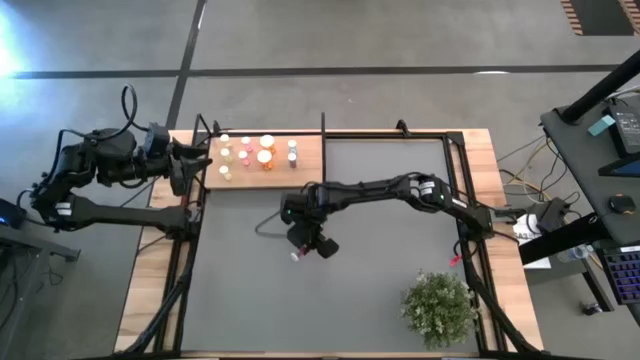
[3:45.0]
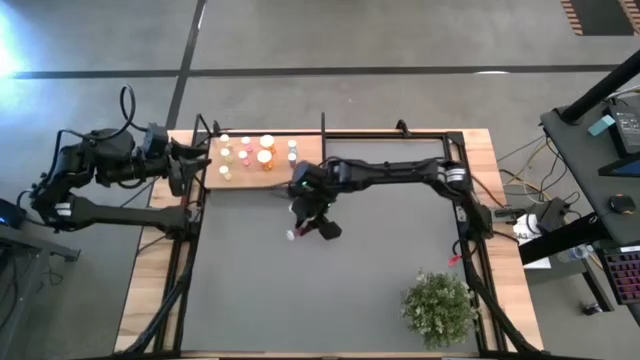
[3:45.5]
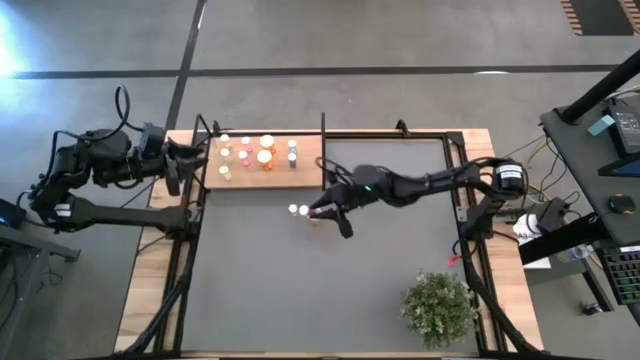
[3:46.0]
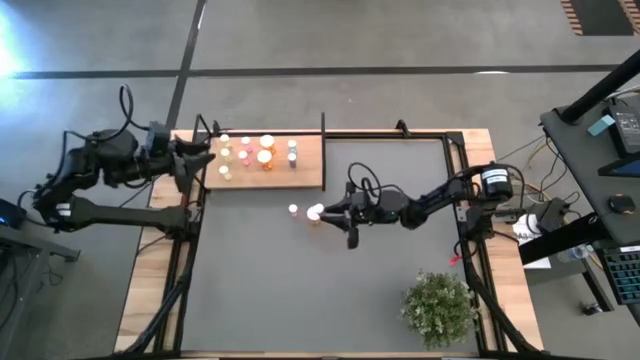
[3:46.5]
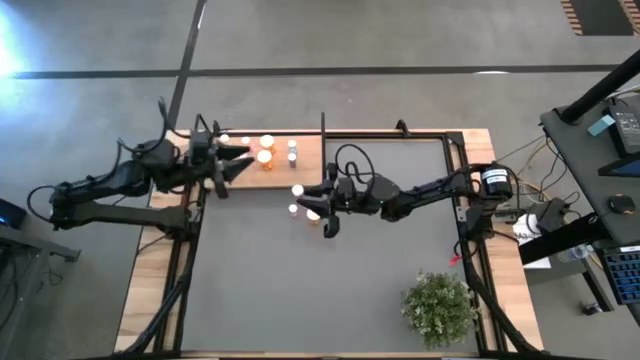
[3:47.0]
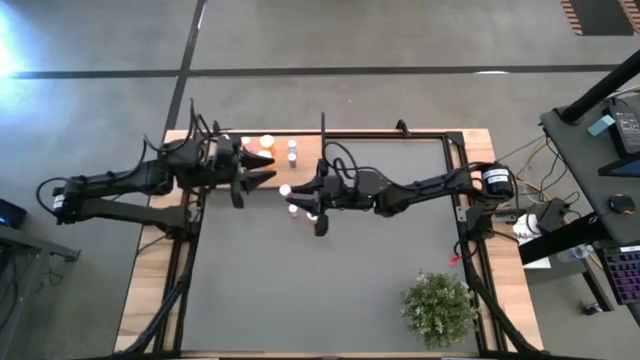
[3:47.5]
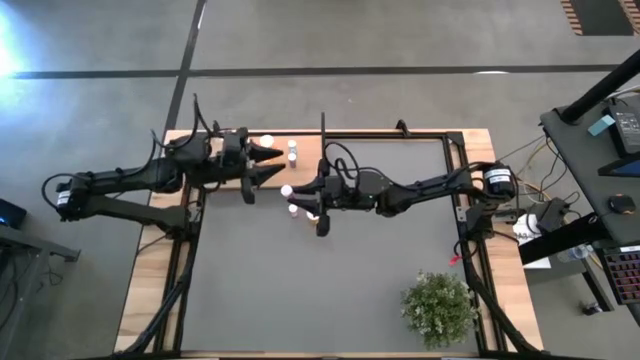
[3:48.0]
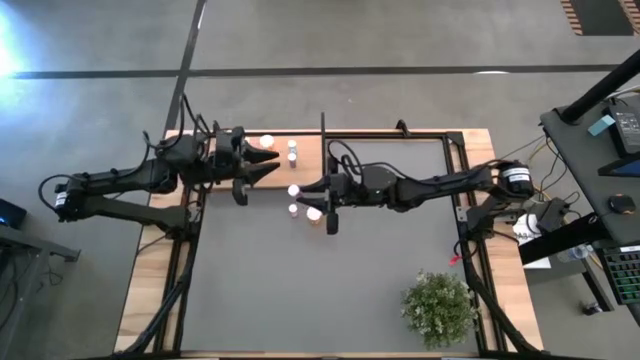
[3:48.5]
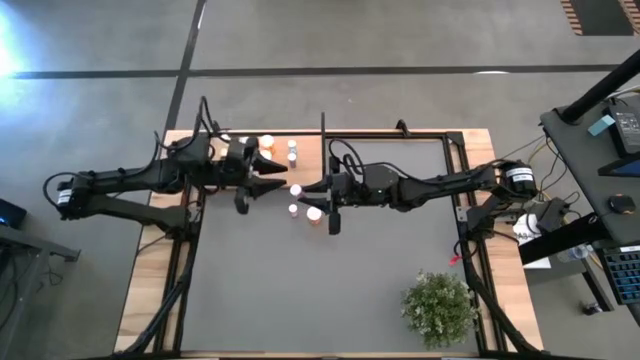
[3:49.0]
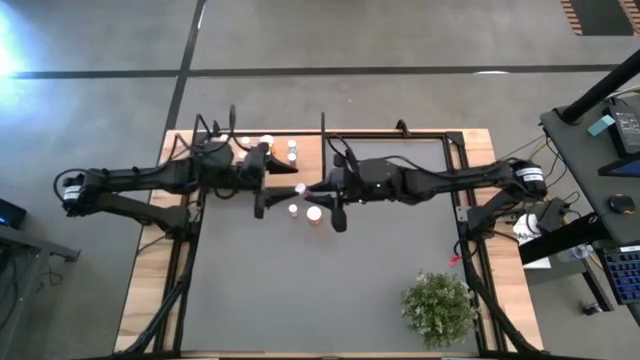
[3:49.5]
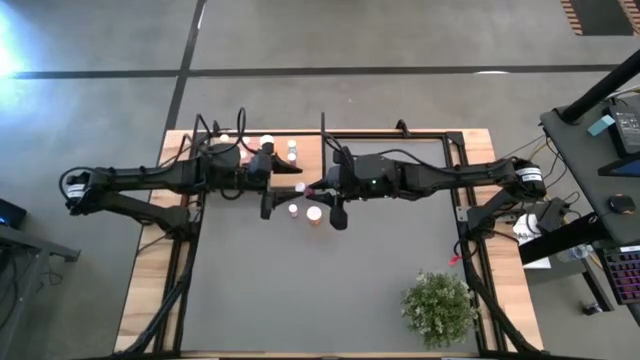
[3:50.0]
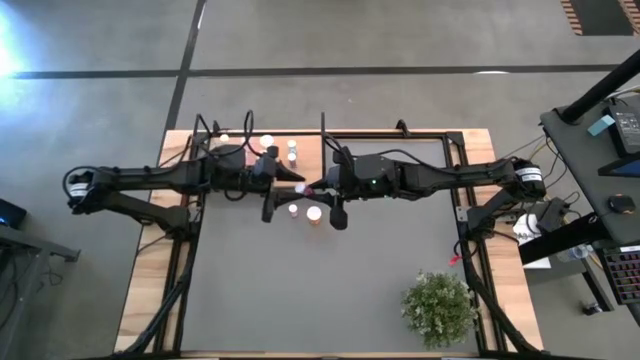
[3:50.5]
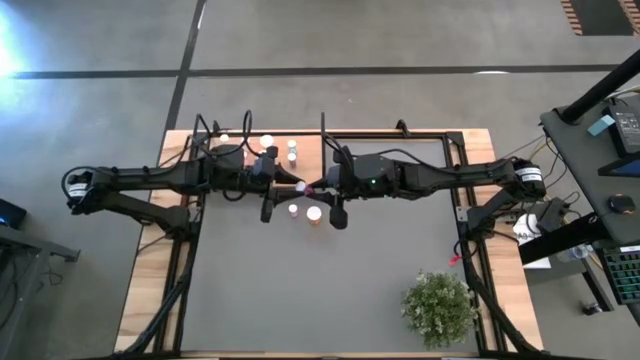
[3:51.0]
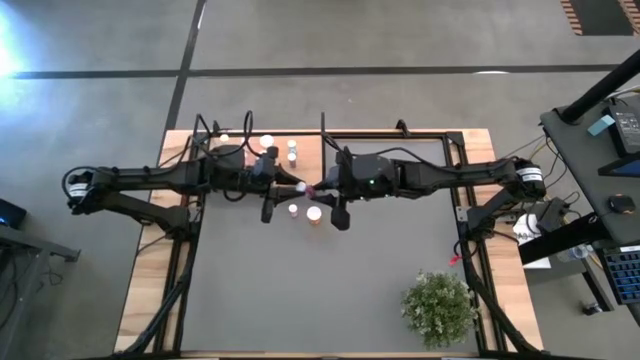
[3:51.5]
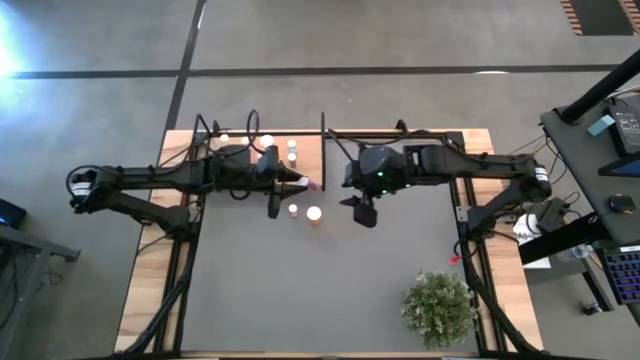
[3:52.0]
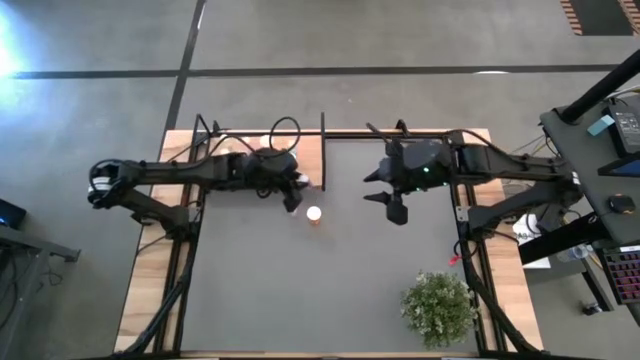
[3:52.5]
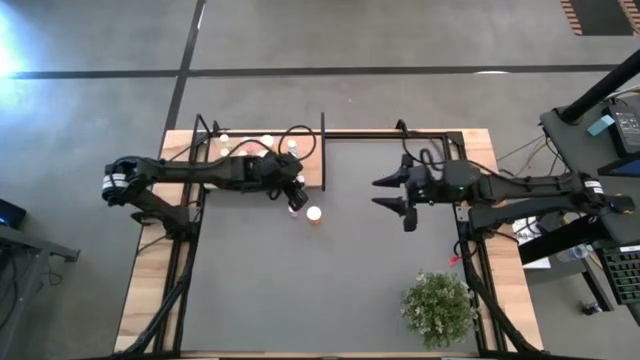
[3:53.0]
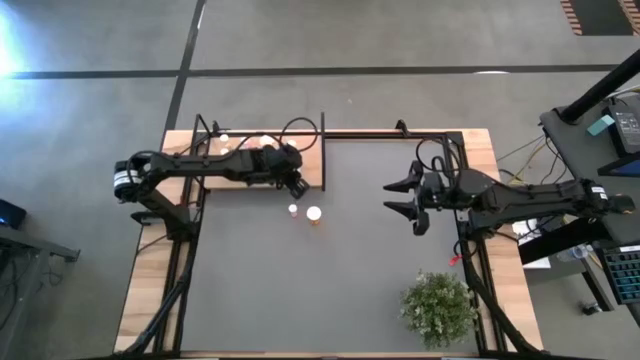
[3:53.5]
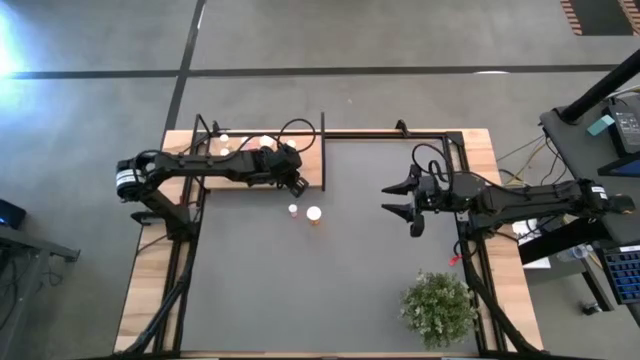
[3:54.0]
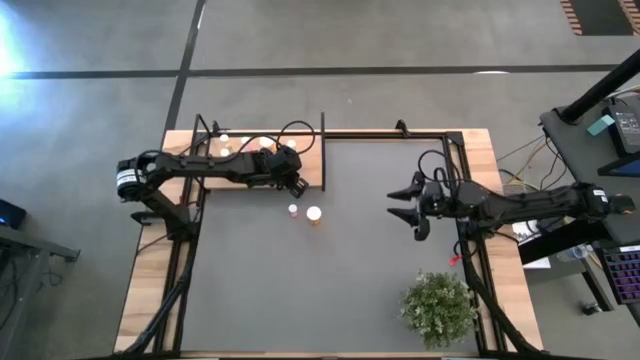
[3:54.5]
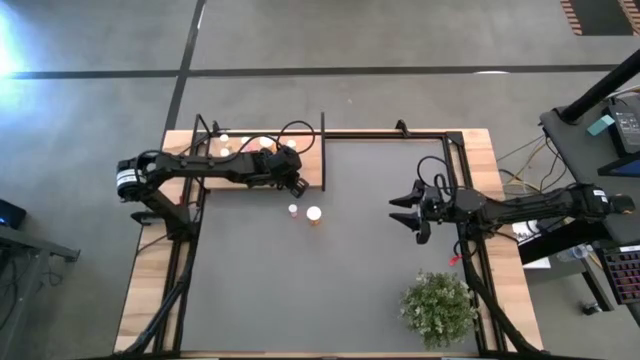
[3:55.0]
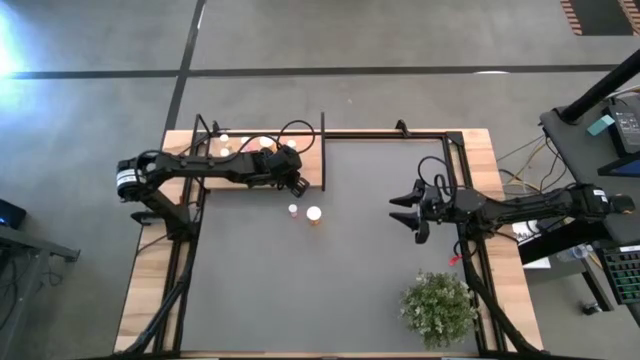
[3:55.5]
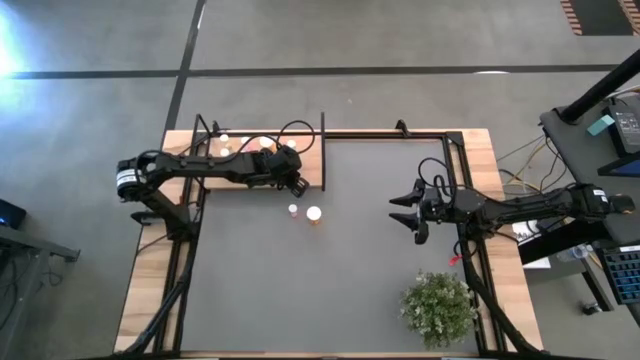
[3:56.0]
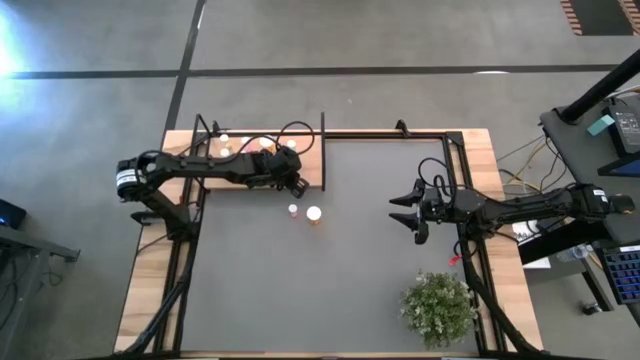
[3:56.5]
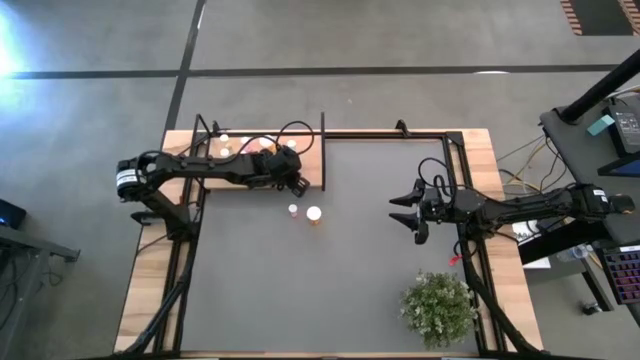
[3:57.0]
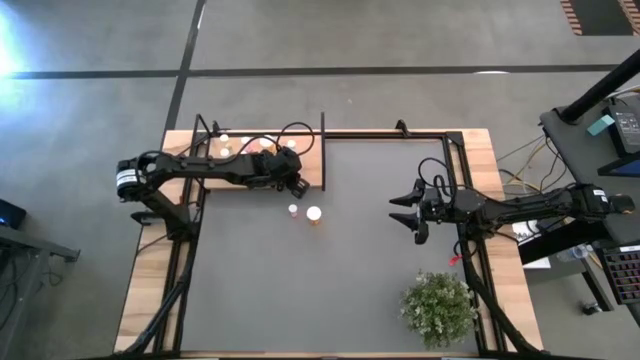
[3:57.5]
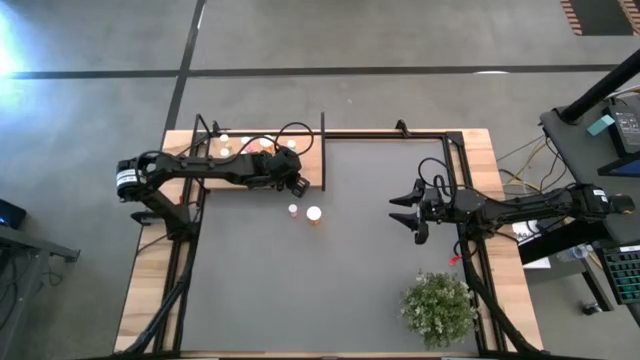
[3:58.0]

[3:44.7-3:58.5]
Task: Pick and place medicine bottles onto shelf by color
Put the blue pill bottle on the shelf aligned with the other blue pill bottles

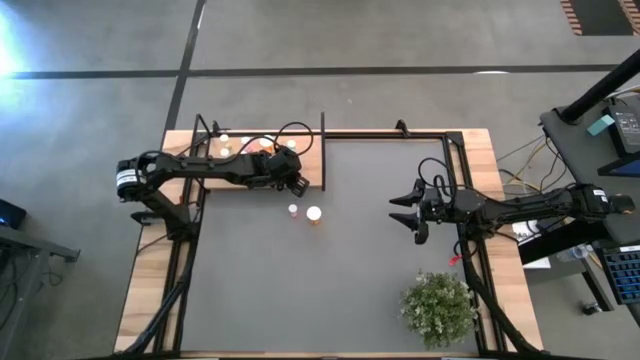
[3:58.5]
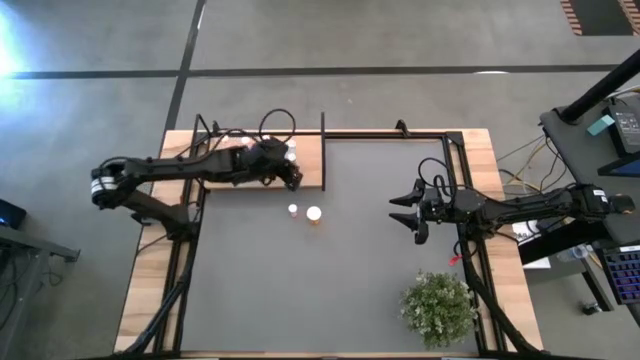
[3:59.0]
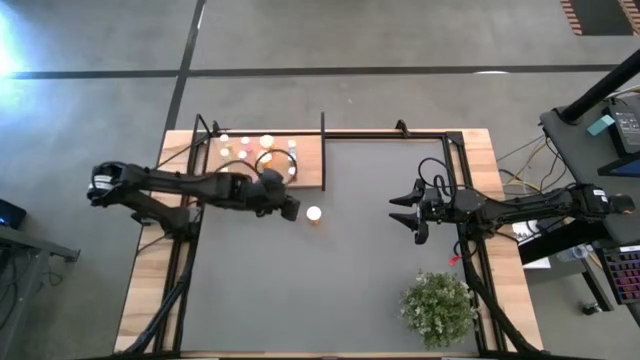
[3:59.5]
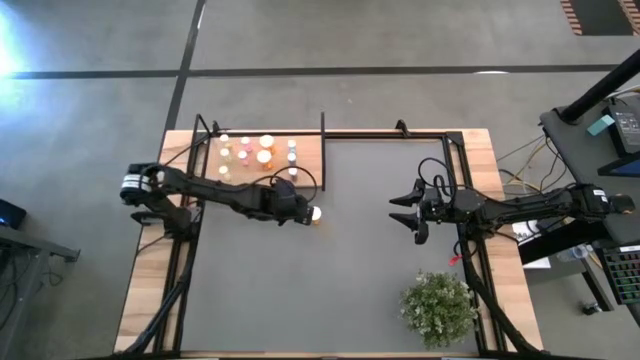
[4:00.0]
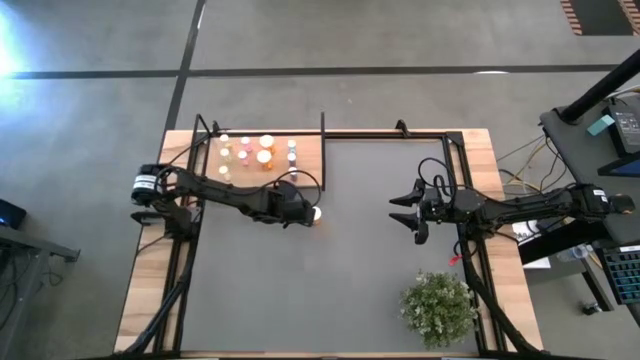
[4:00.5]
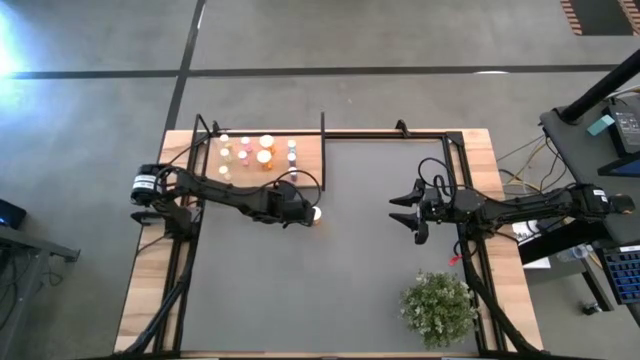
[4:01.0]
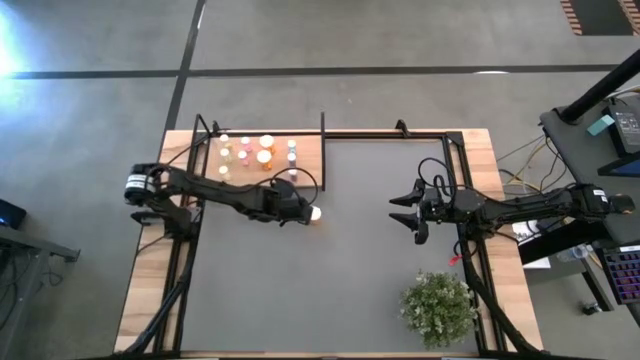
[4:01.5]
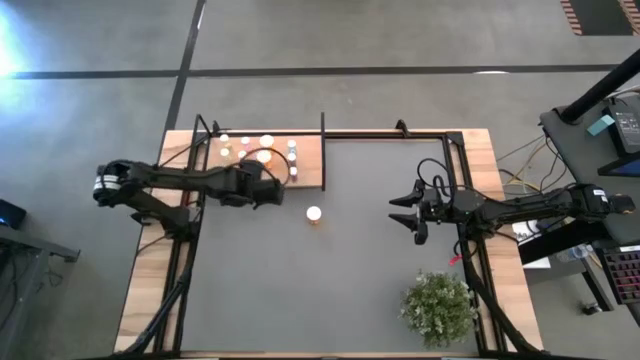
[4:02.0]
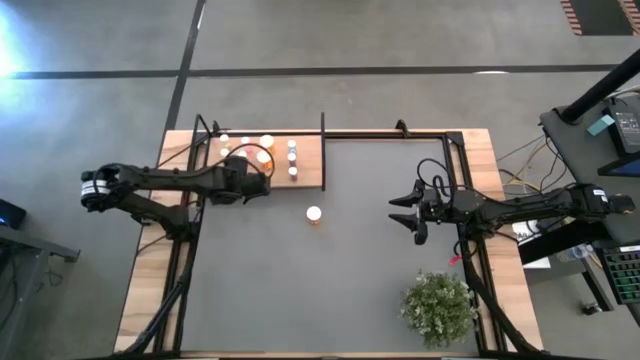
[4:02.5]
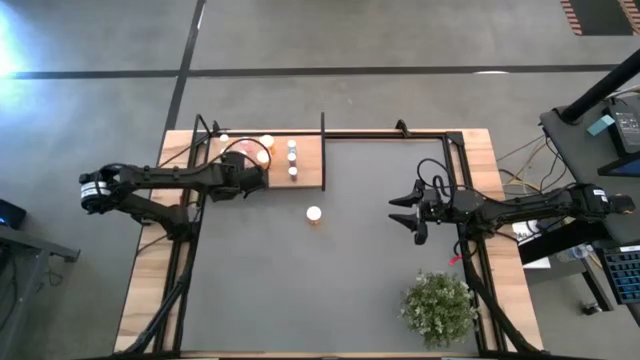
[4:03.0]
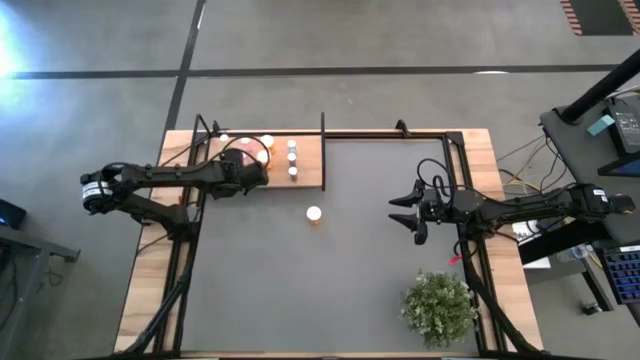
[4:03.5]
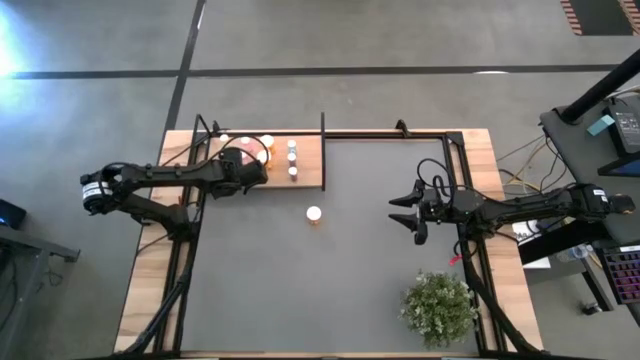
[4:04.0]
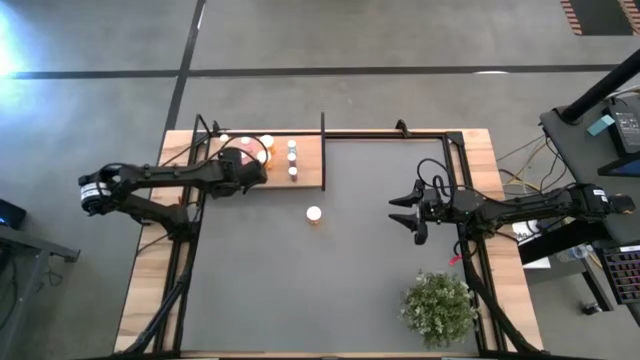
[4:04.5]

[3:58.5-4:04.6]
Put the pink pill bottle on the shelf aligned with the other pink pill bottles

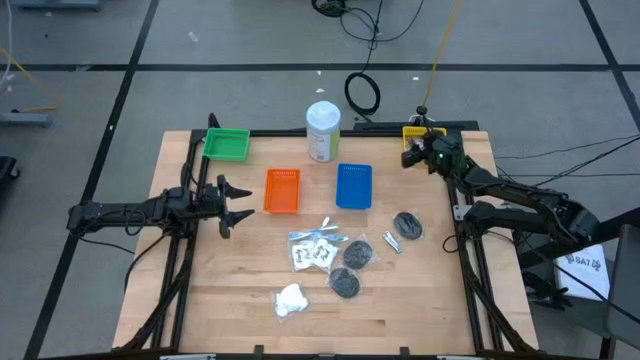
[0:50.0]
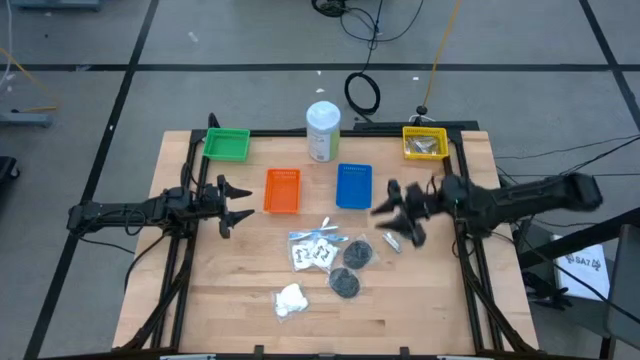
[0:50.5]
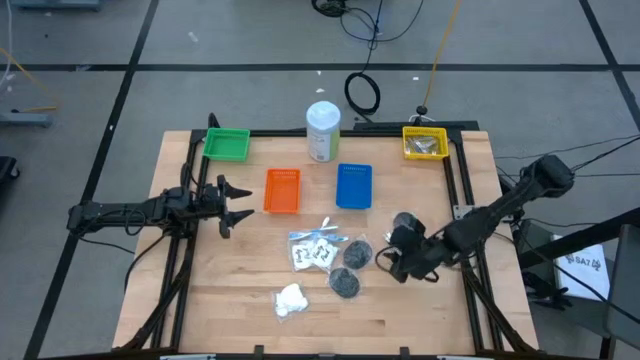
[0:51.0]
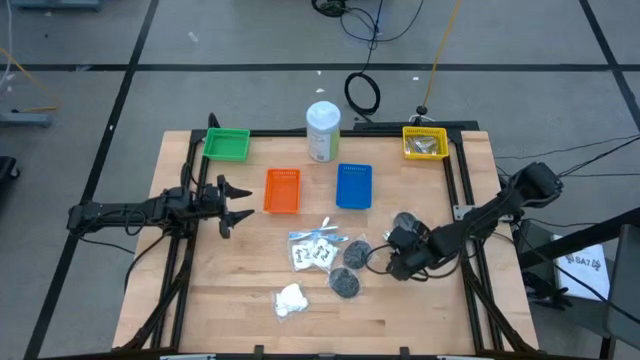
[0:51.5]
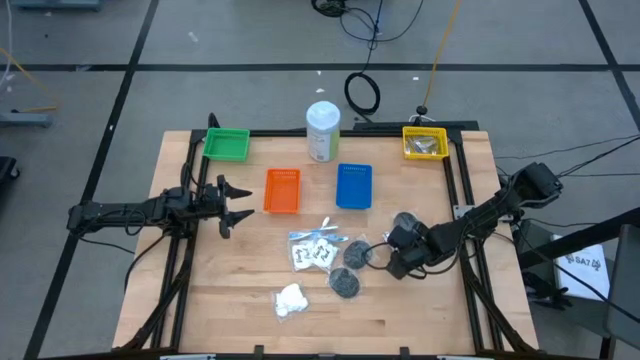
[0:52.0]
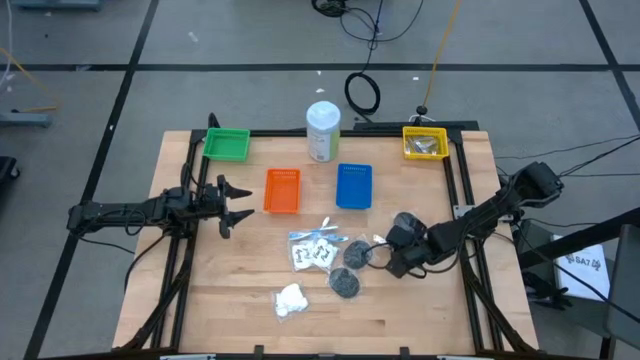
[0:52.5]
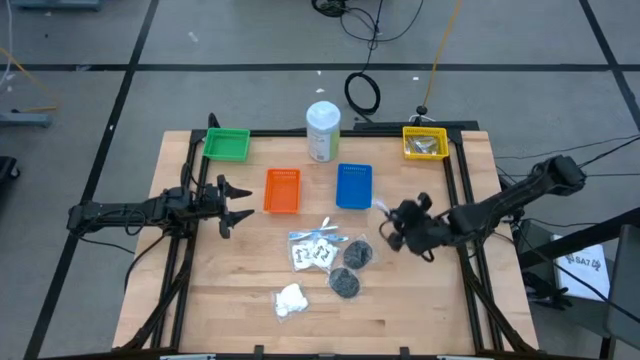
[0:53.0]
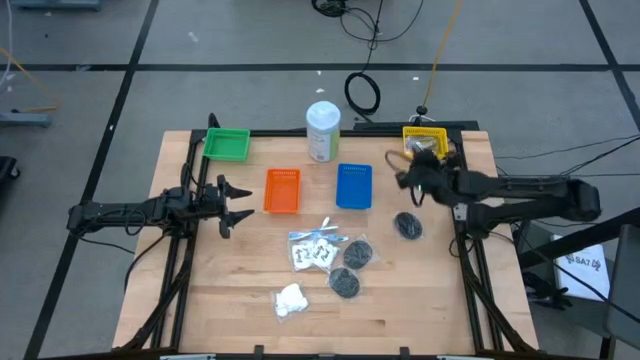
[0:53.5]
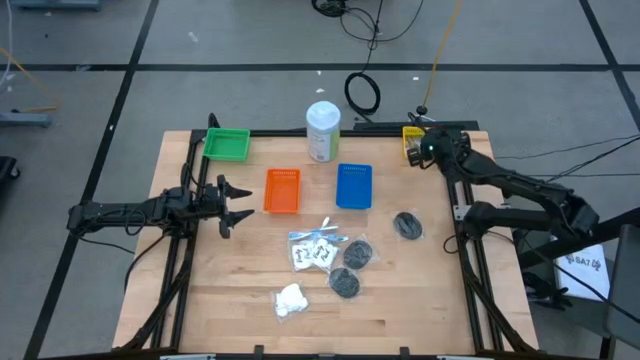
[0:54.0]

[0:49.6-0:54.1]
Task: Pick & Place Travel size toiletries
Put the nail cutter into the yellow bin
